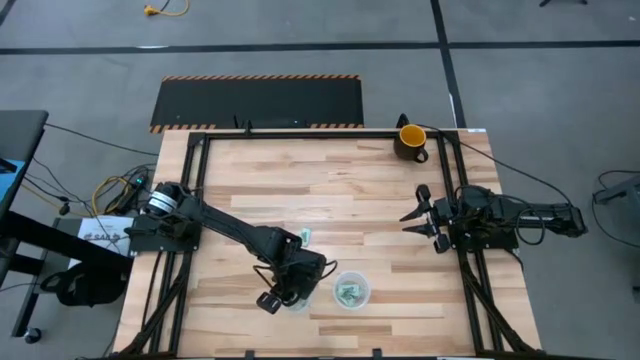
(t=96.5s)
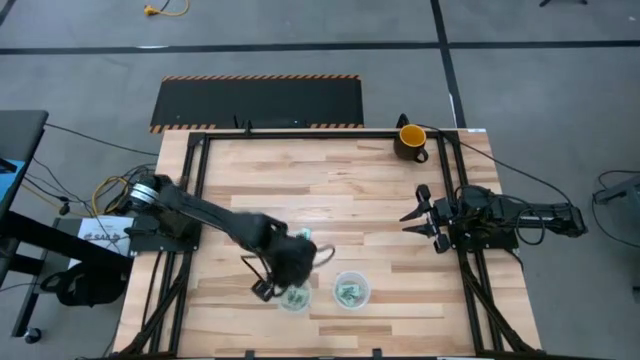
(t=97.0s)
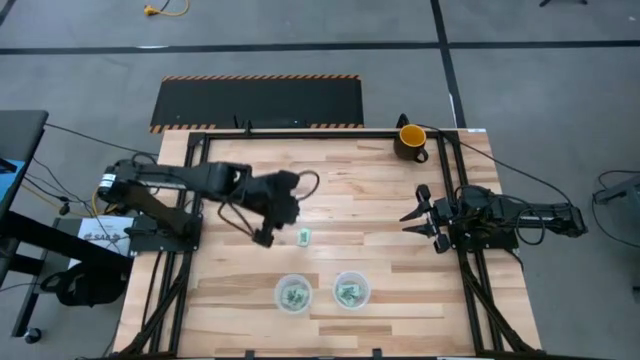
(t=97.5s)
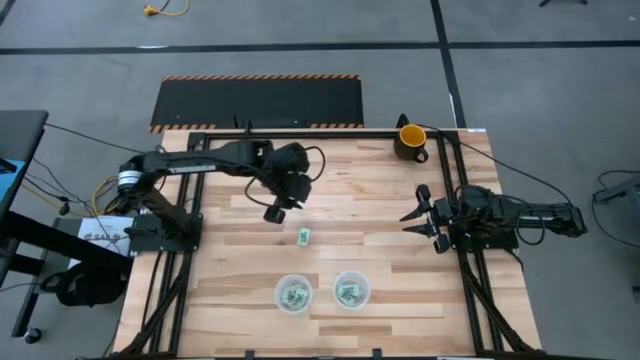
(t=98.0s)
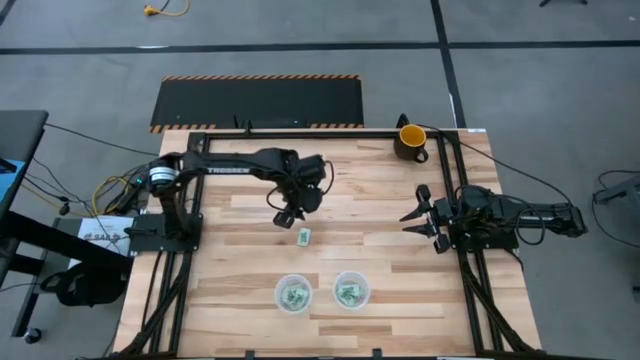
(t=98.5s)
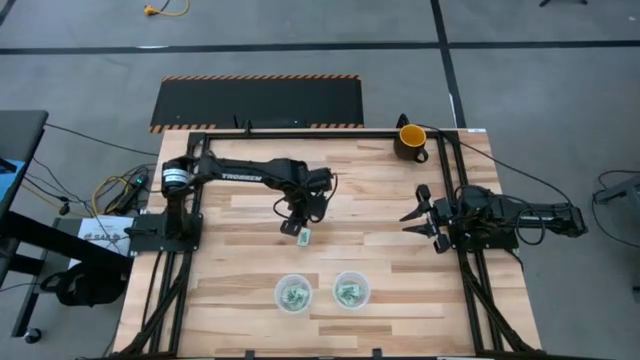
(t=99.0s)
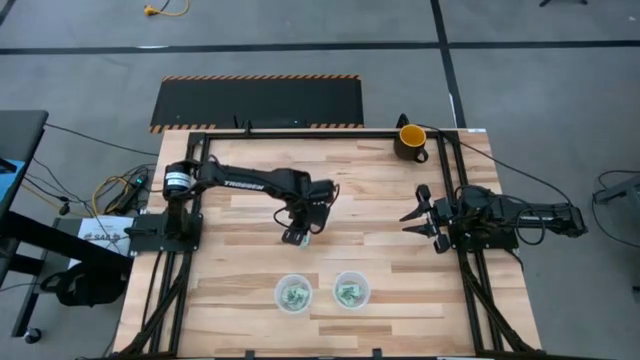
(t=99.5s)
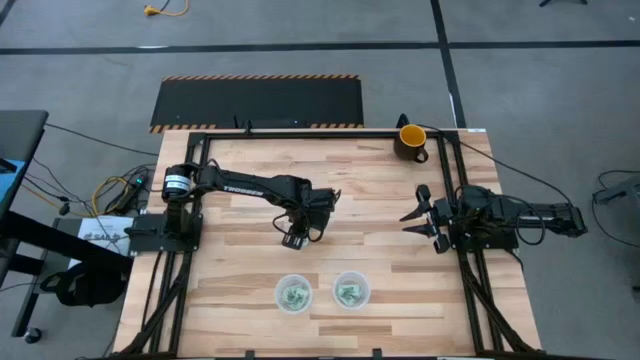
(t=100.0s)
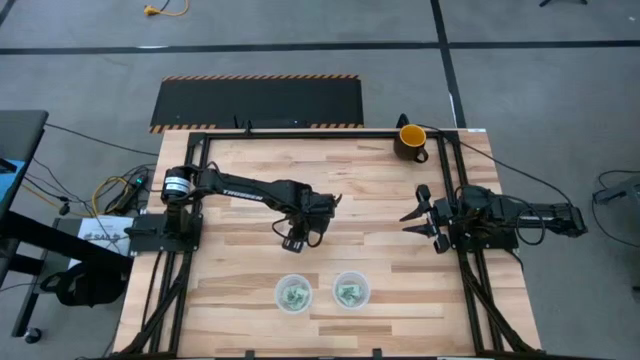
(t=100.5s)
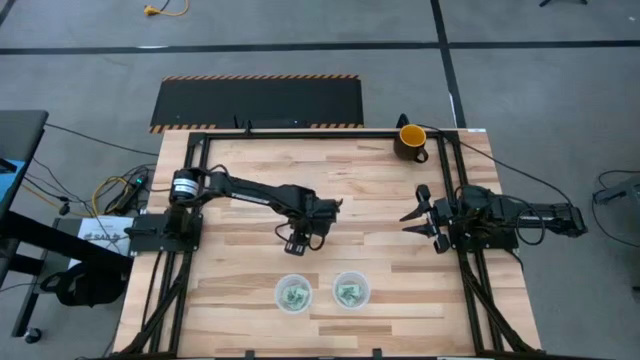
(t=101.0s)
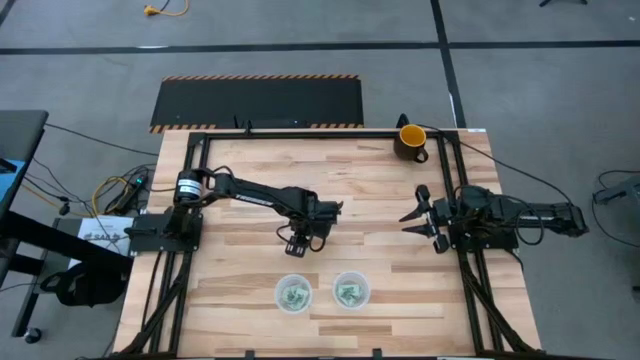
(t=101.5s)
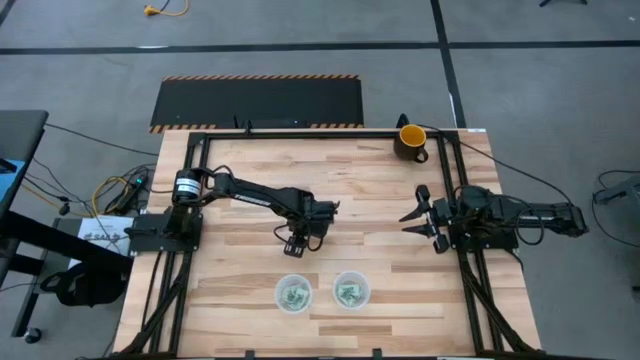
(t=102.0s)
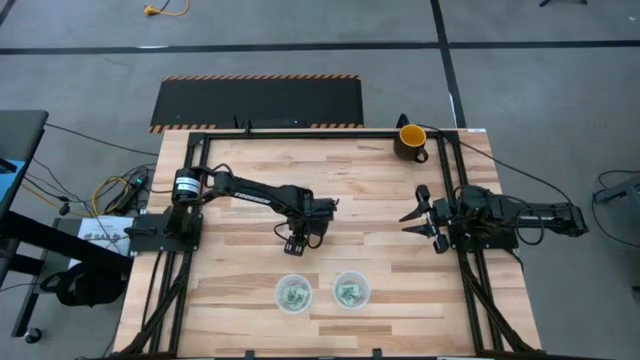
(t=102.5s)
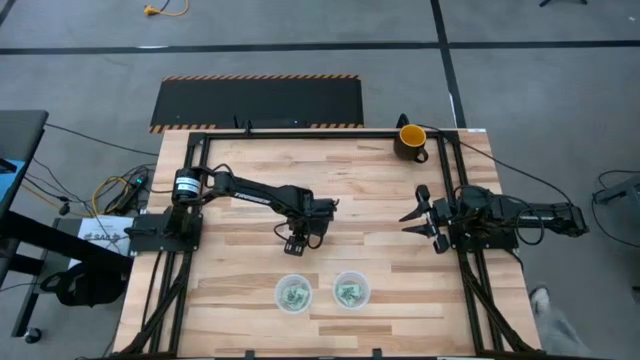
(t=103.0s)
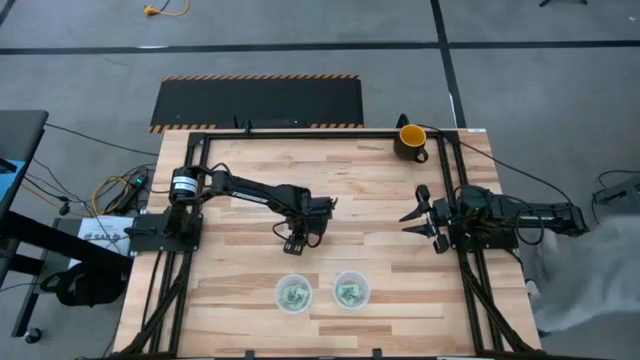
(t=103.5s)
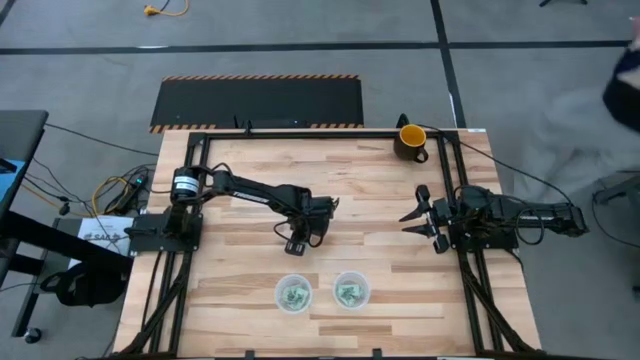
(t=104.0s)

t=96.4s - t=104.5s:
Task: Pick and place Stevia / Truvia into bins
Put the white stevia pack into the left transparent basket

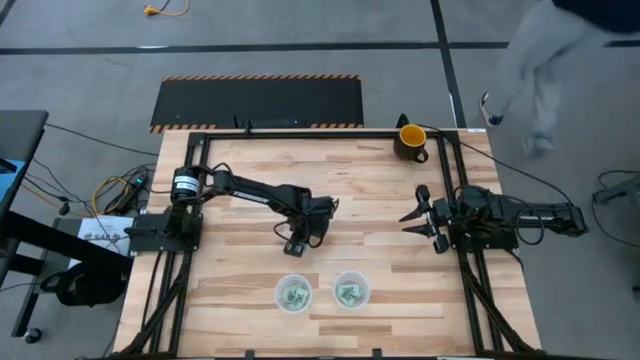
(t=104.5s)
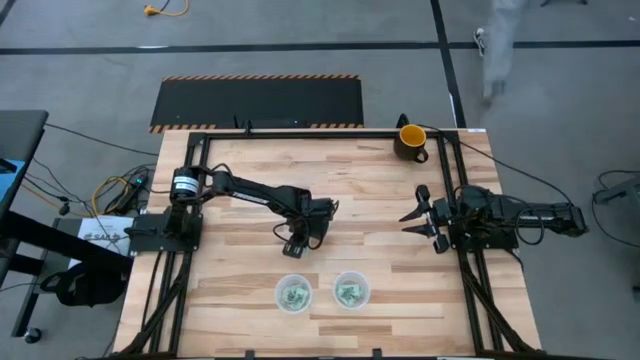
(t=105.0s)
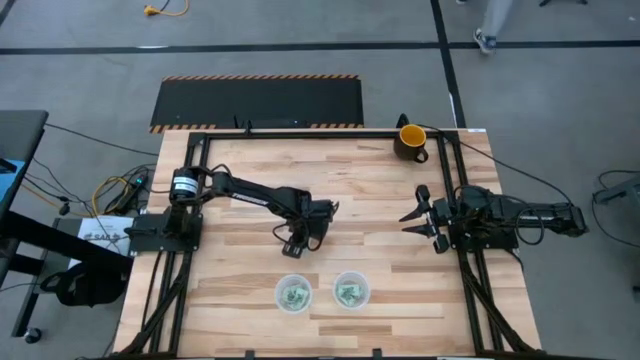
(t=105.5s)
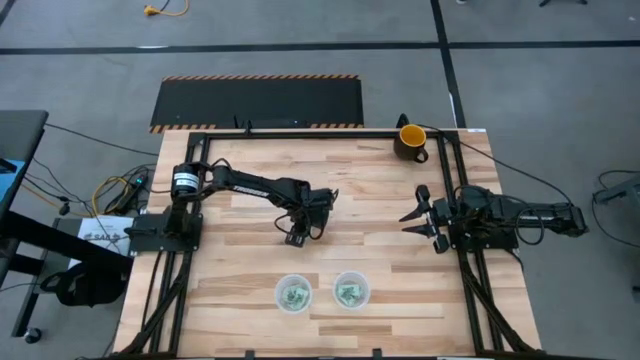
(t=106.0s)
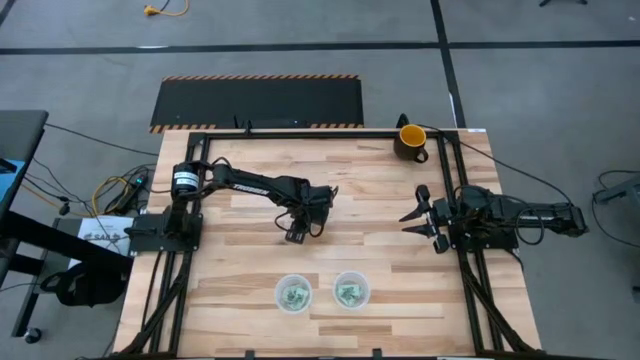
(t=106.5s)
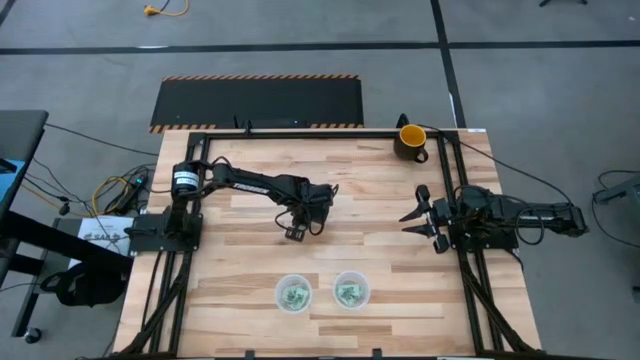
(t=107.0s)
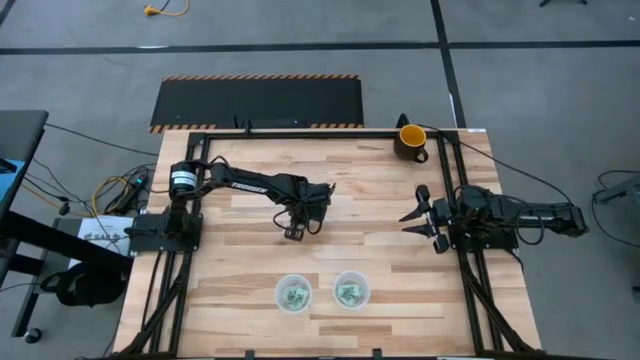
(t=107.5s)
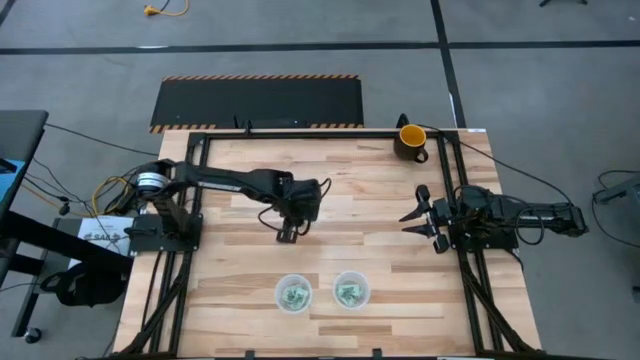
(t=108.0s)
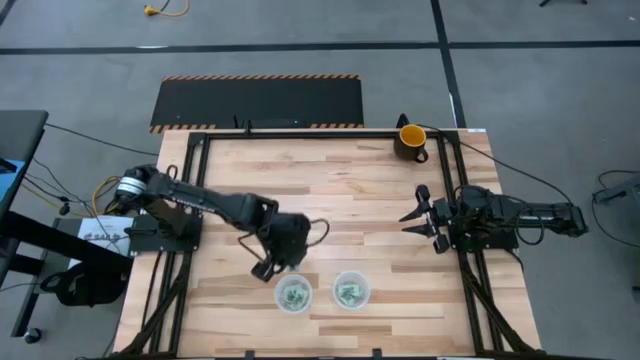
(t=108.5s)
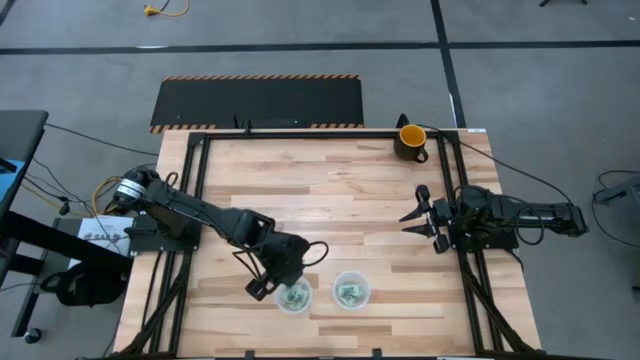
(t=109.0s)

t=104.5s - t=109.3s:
Put the white stevia pack into the left transparent basket

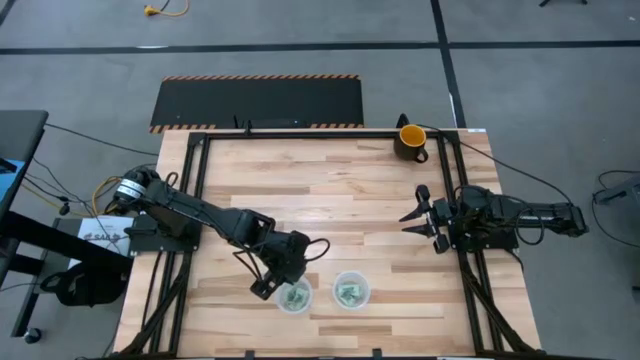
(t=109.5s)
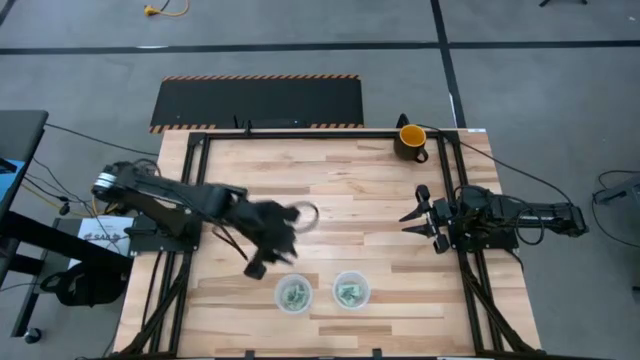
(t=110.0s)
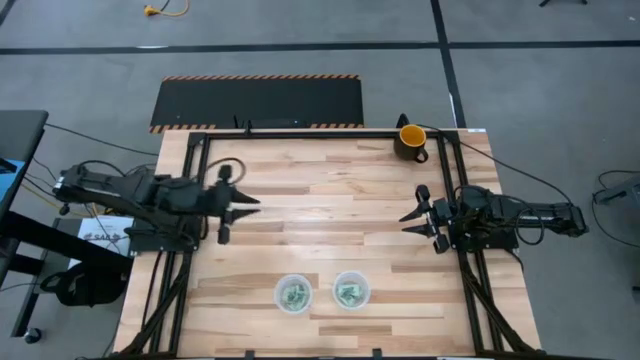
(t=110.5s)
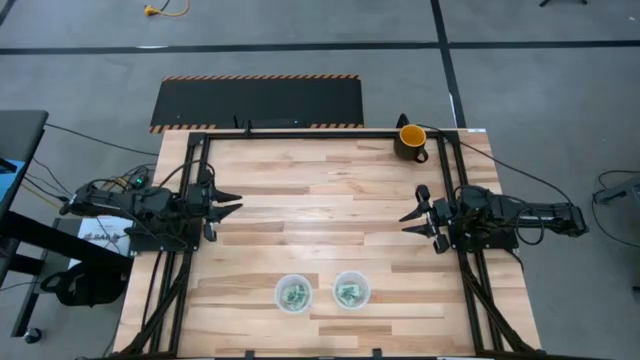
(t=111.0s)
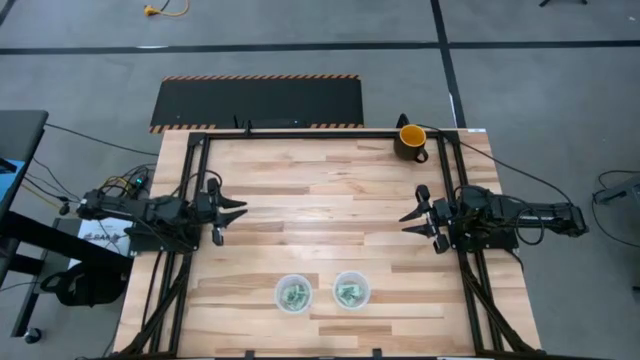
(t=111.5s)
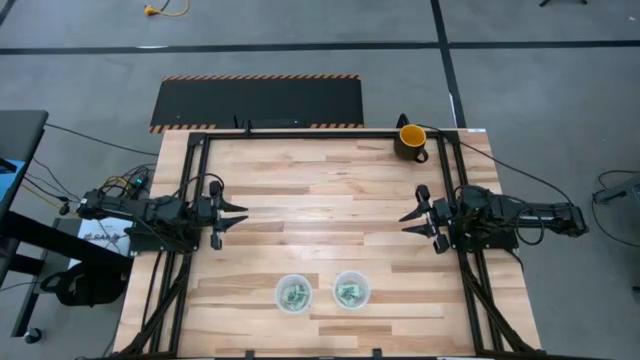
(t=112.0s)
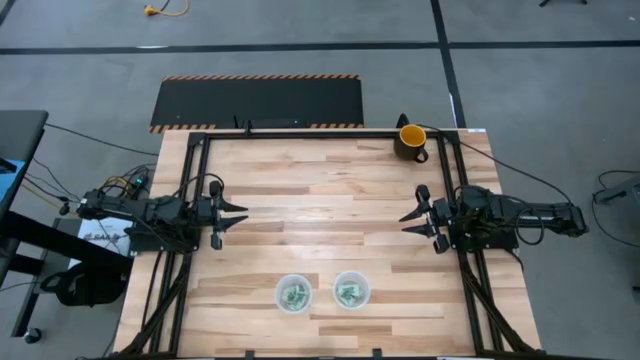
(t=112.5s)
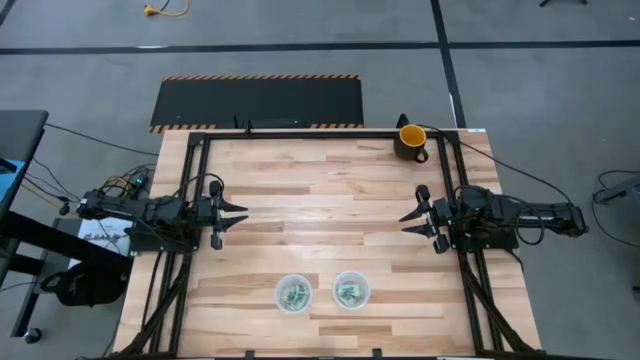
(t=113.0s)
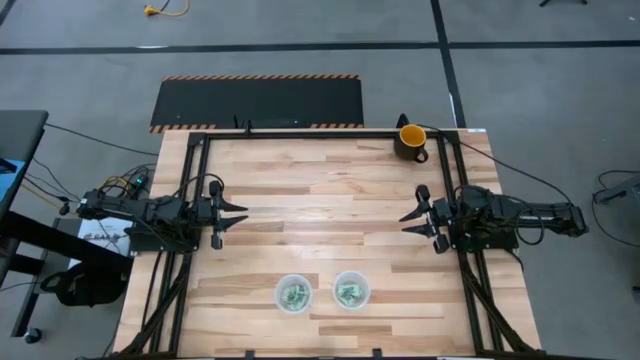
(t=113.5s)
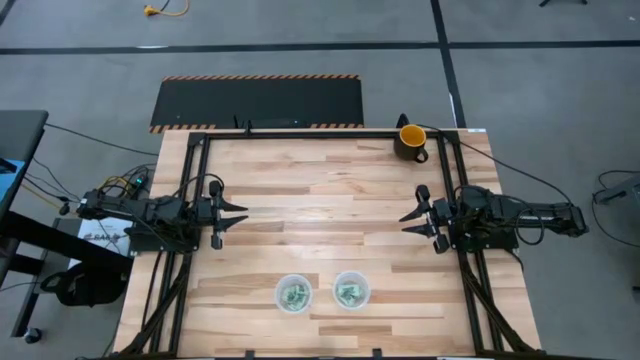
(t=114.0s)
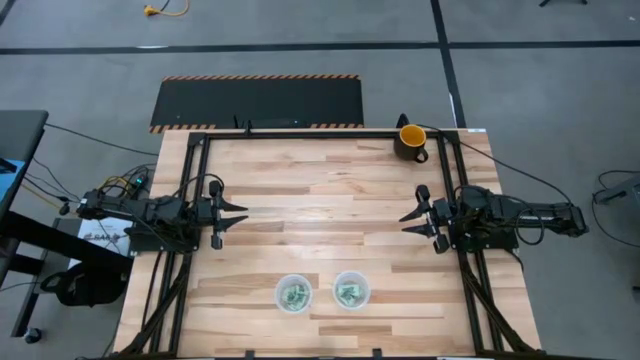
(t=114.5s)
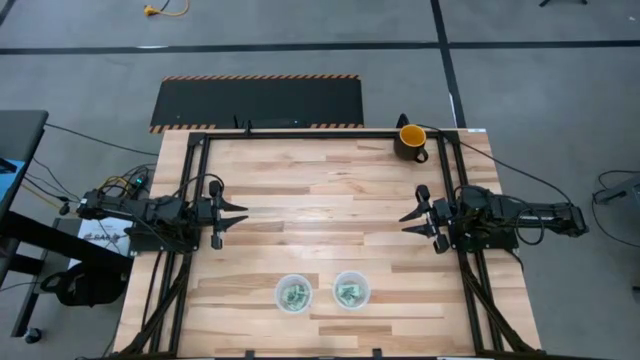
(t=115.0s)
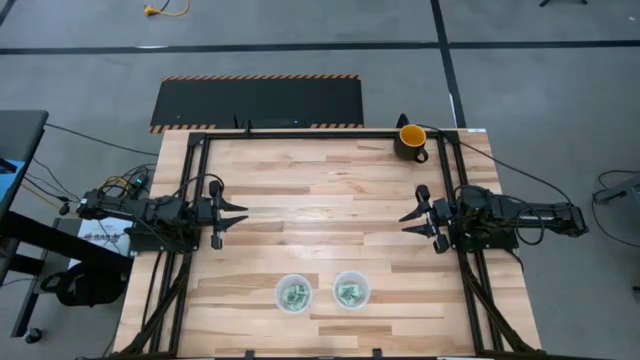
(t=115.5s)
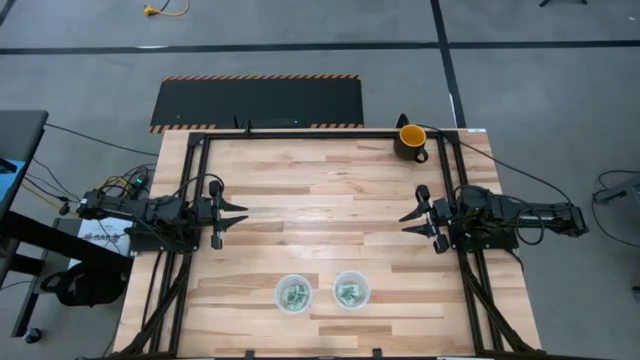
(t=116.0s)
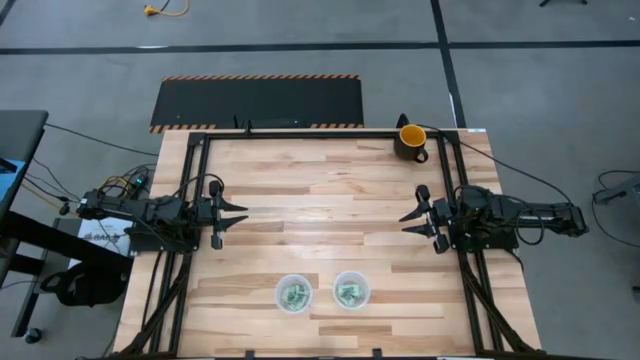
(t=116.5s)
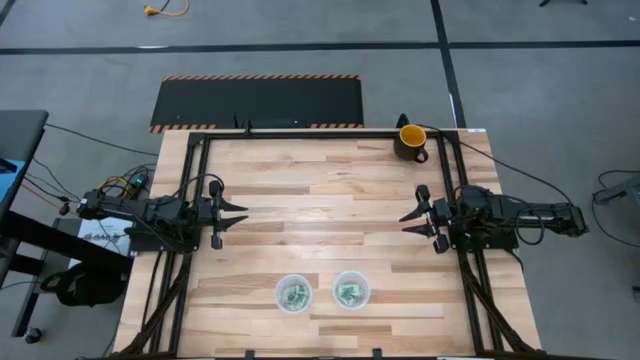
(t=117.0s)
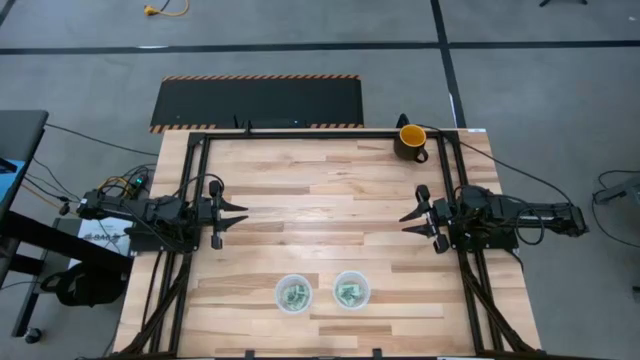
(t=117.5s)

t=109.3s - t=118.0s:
Return to Home Position
